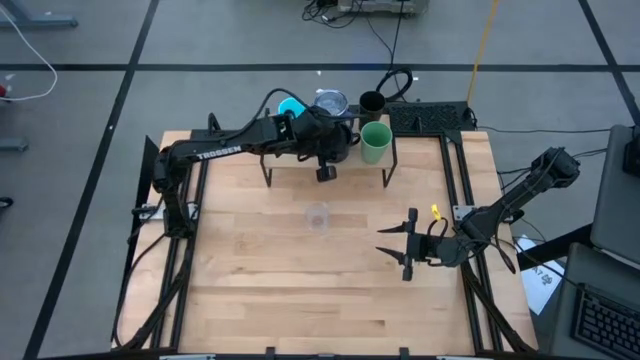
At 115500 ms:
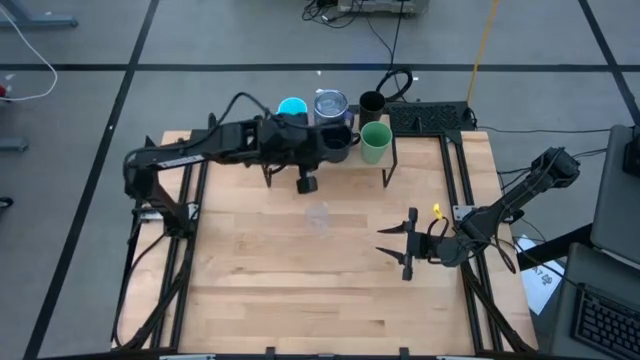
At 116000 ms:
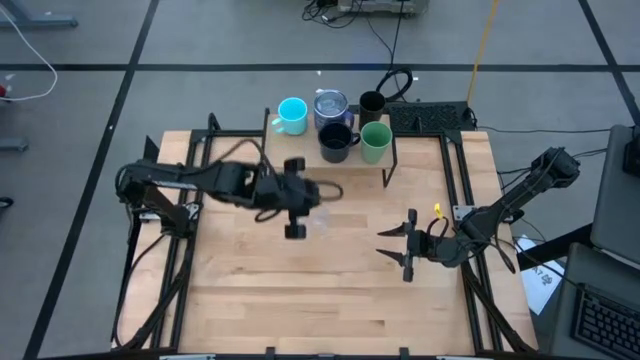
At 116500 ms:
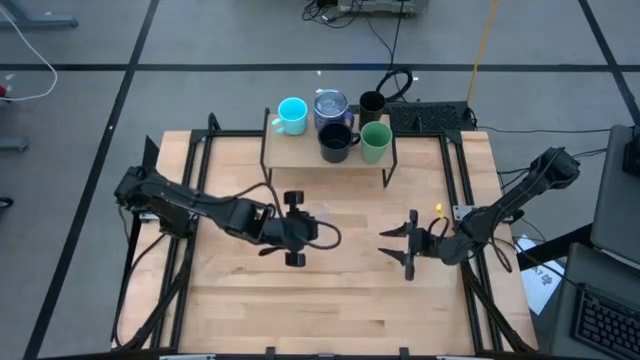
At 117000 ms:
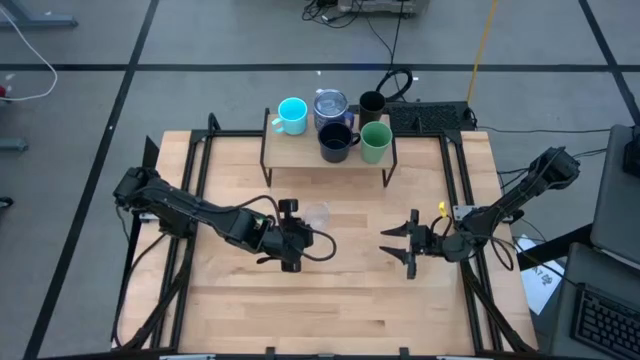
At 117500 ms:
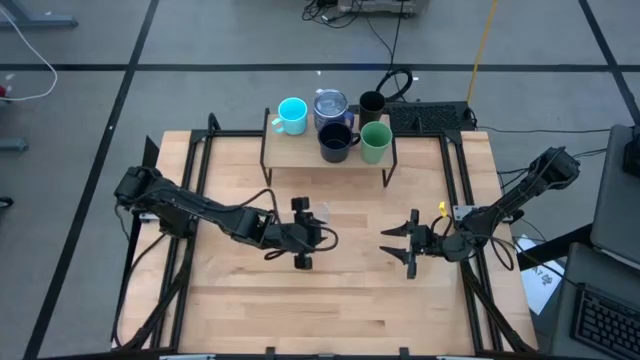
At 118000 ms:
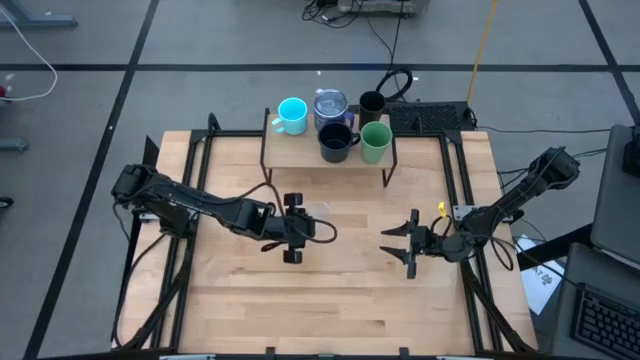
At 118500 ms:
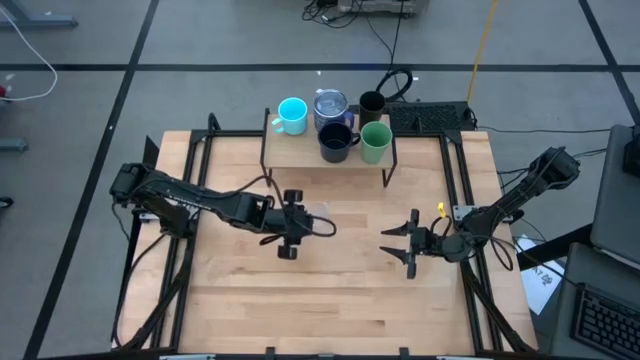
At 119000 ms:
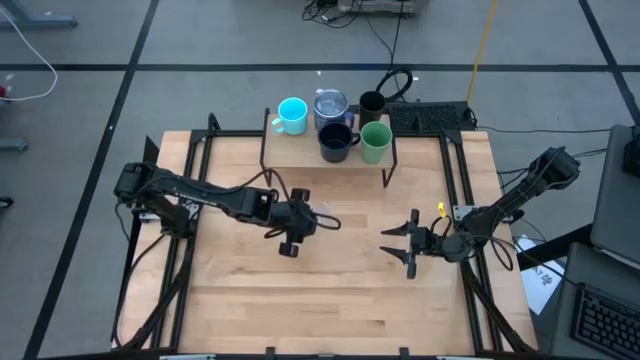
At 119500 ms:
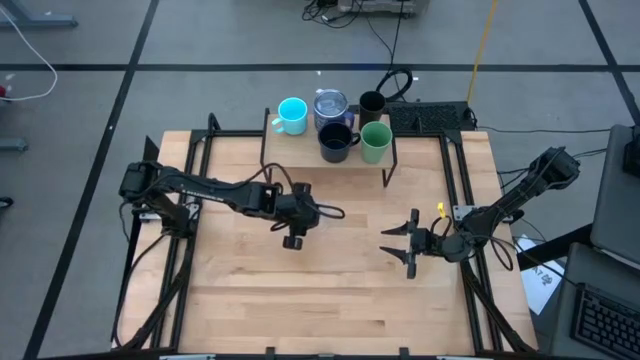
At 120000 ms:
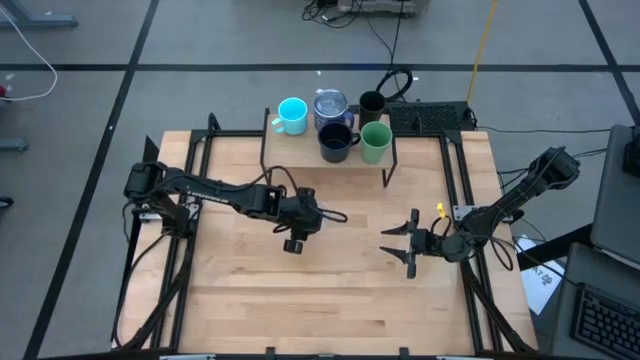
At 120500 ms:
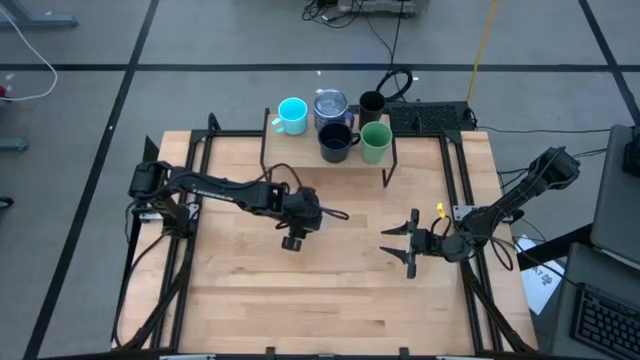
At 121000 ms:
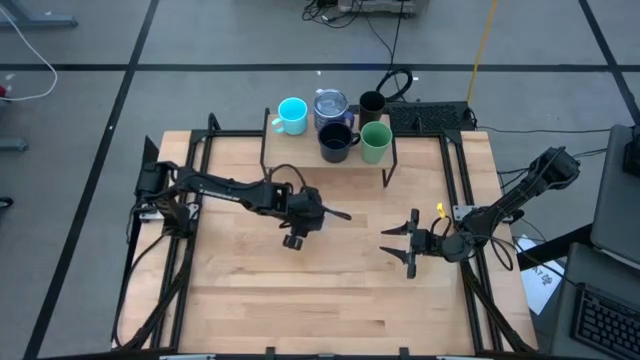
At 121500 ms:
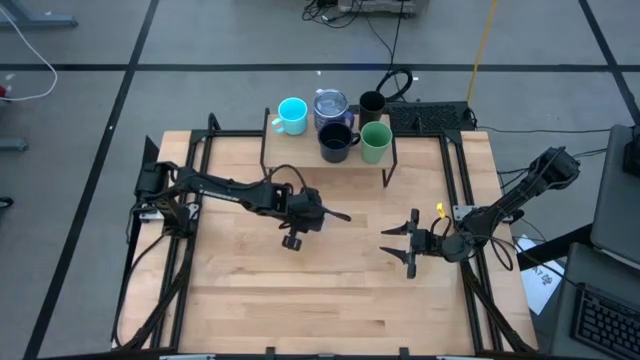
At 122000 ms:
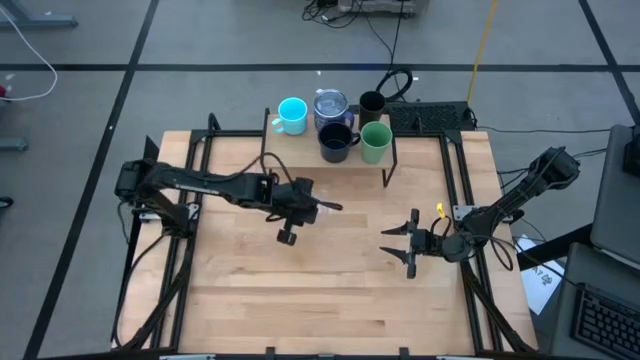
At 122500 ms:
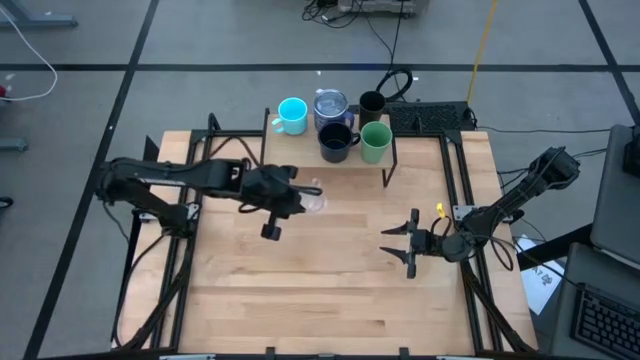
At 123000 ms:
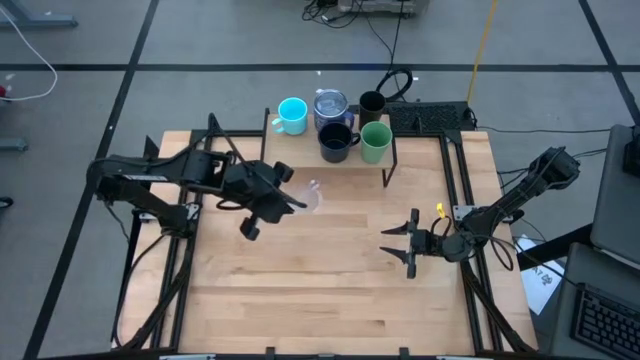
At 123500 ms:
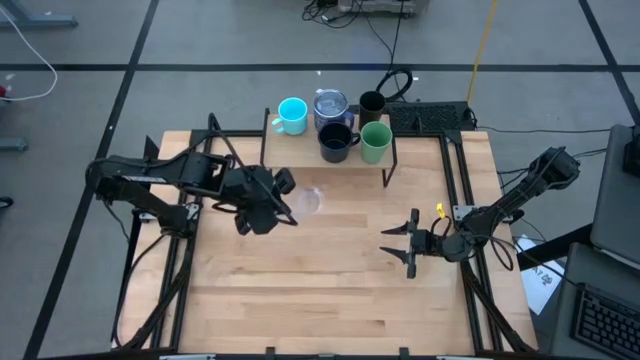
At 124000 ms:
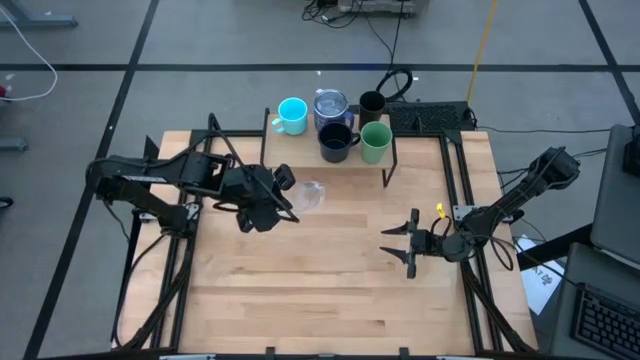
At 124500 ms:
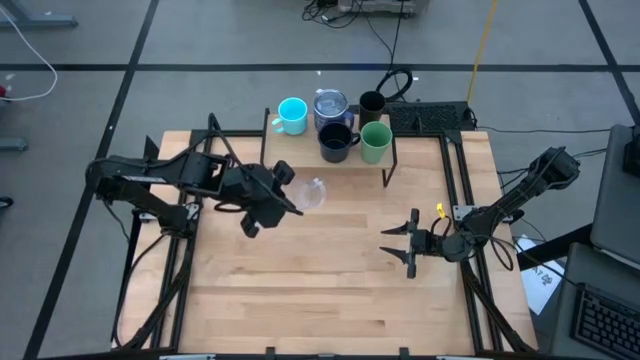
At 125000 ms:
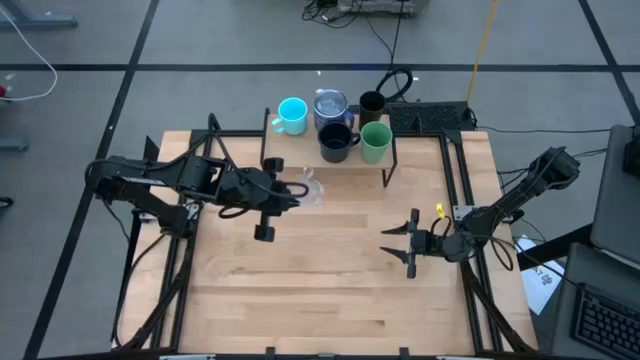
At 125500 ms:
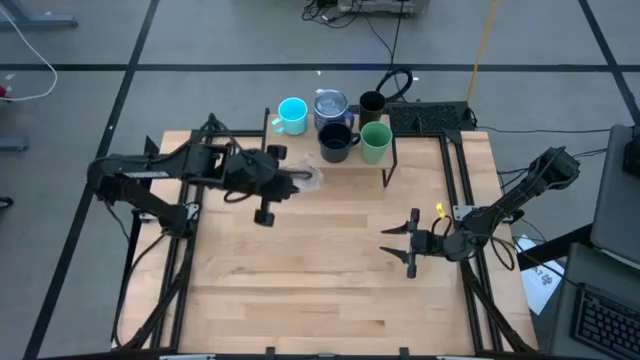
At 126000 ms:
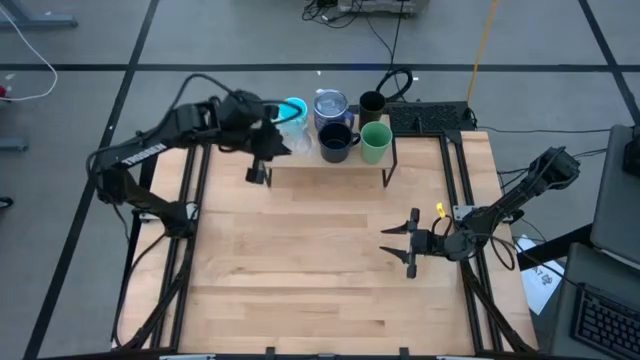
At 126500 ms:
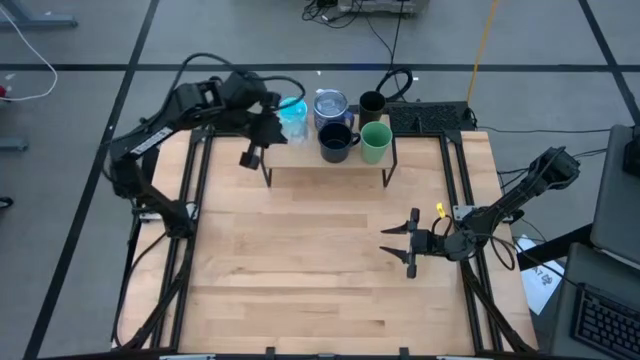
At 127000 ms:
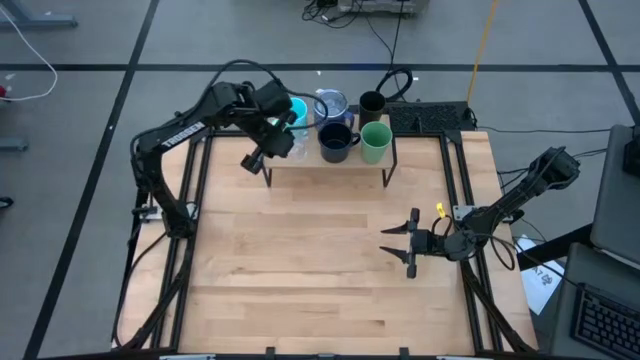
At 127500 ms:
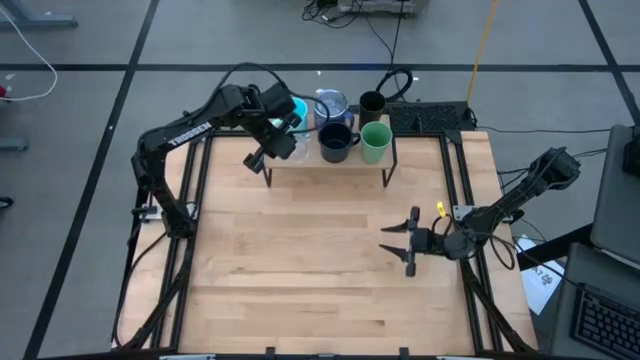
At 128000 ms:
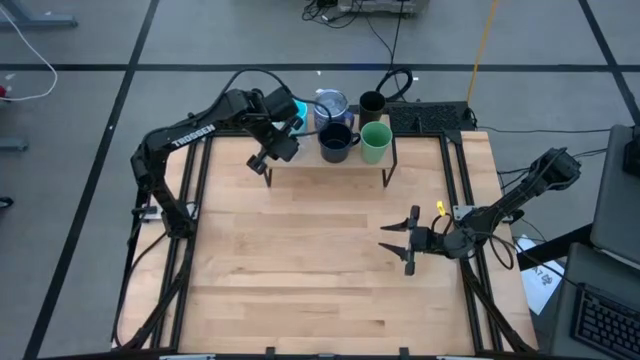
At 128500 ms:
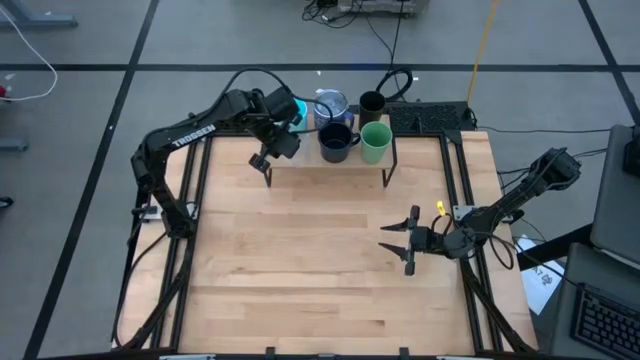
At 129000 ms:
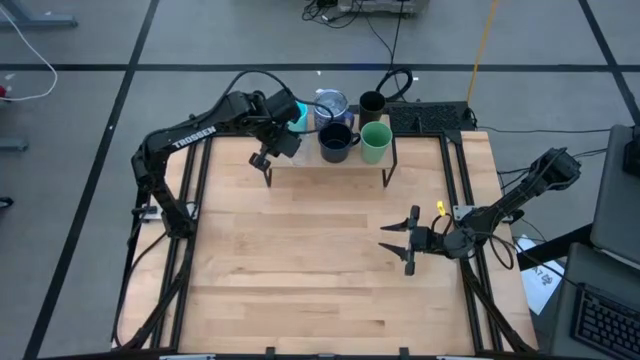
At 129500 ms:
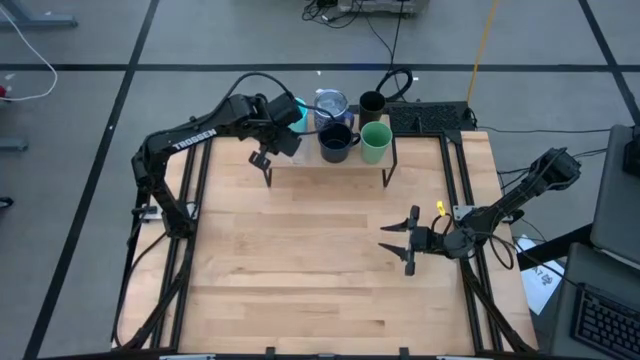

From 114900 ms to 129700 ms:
Task: Stack small to large cups/mugs on shelf
Put the transparent mug on the shelf aligned with the other light blue mug

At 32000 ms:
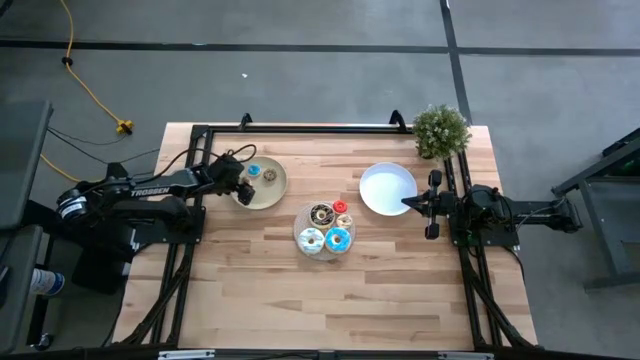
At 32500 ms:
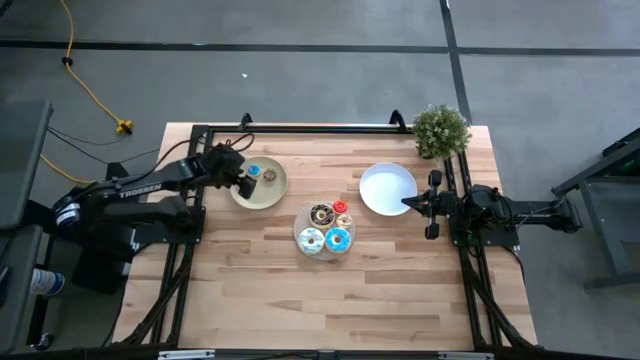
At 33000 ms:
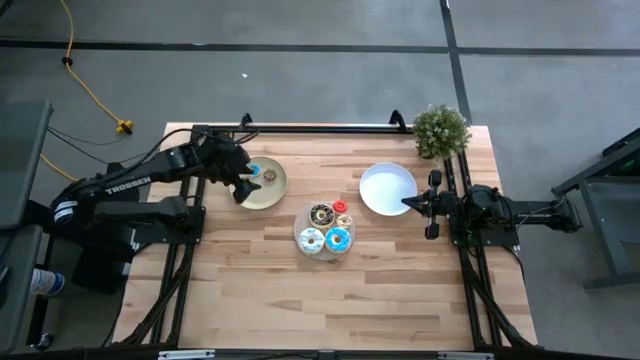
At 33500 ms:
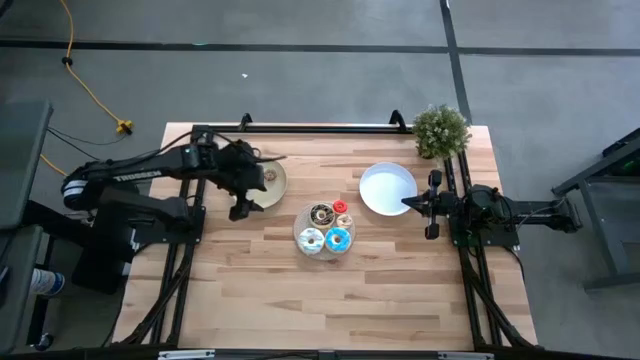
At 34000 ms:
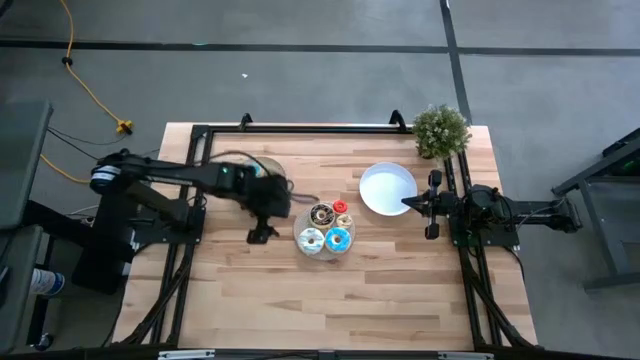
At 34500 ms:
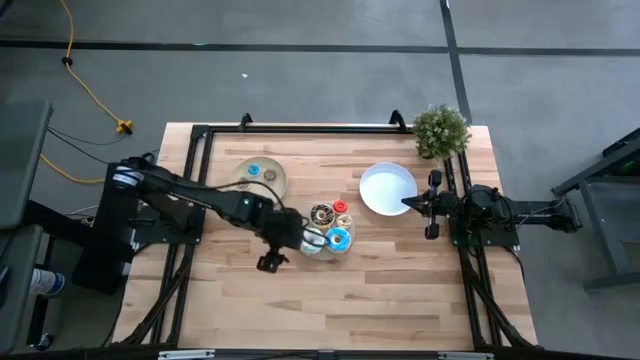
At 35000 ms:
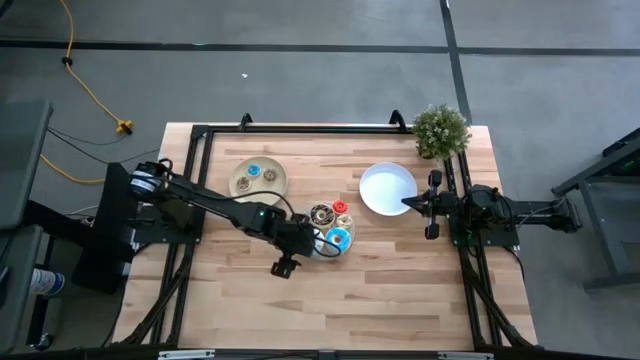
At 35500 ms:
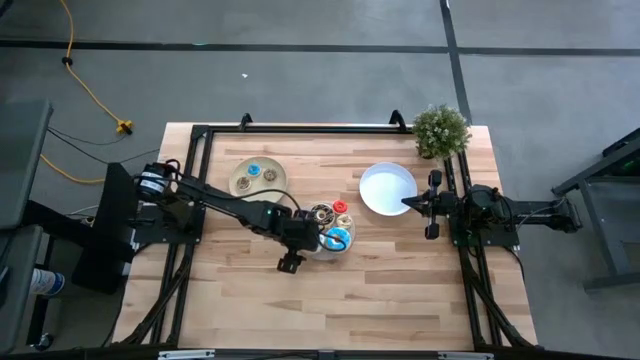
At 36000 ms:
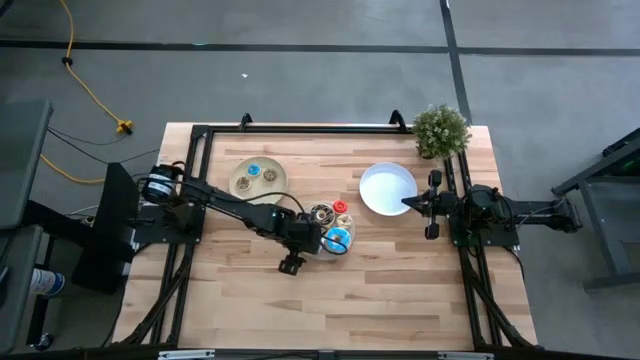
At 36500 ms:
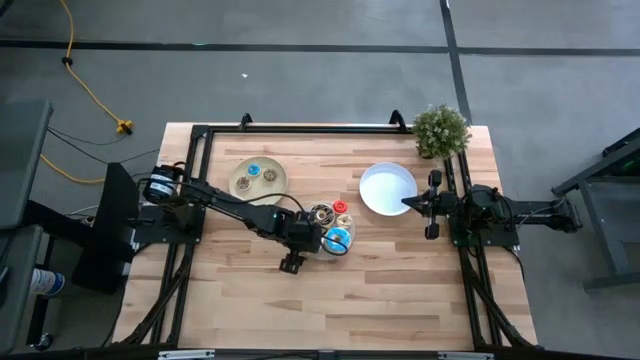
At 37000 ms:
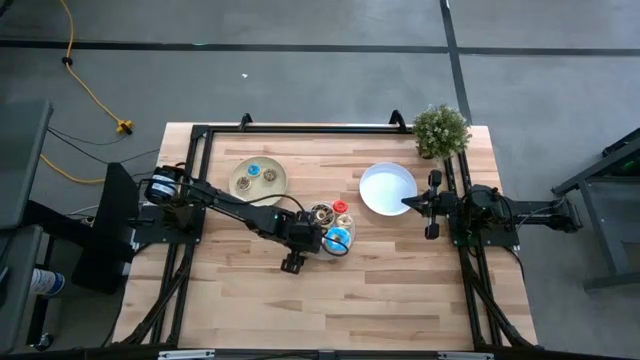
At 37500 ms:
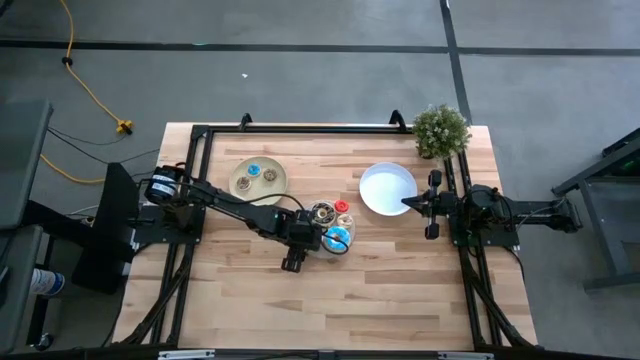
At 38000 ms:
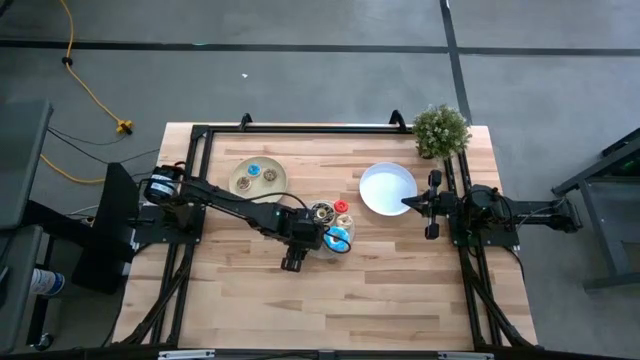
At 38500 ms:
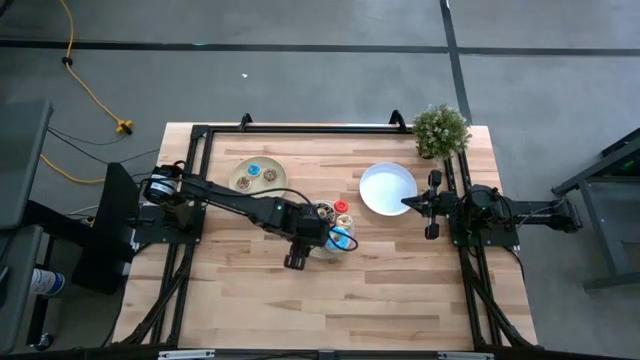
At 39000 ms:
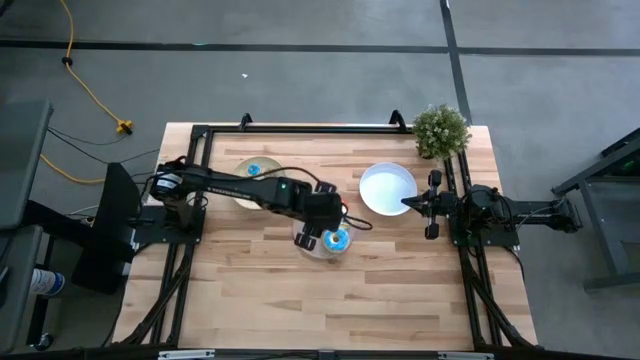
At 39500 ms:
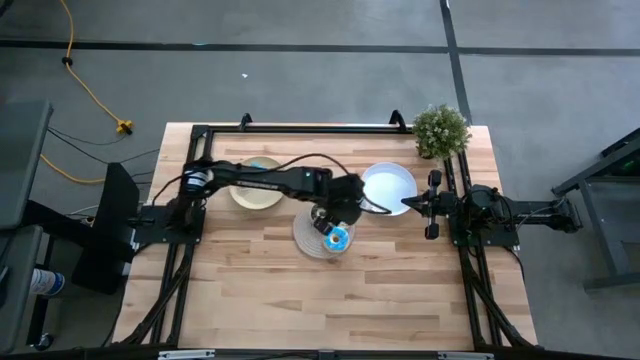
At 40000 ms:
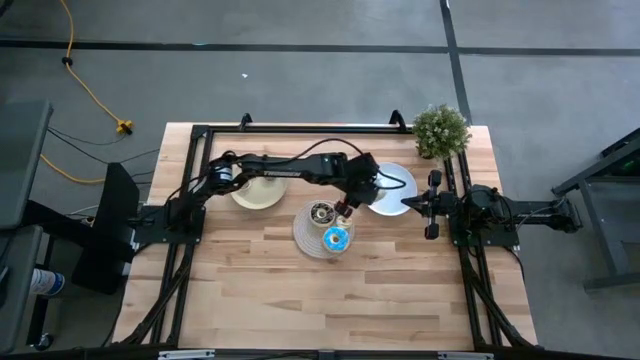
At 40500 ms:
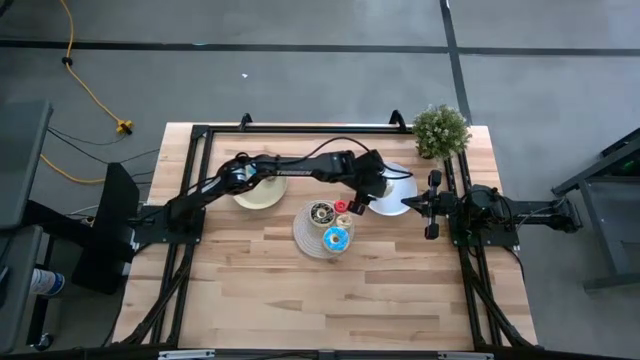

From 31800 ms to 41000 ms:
Task: Pick & Place donuts
Put the large white donut on the white plate
